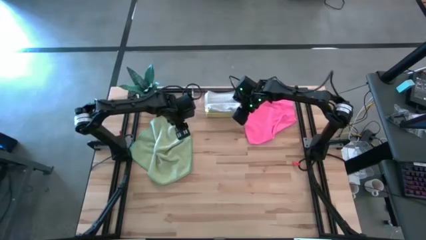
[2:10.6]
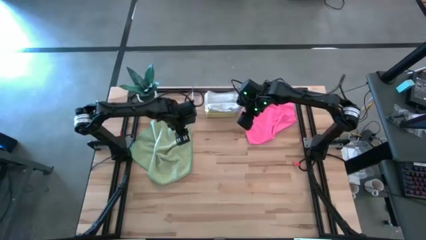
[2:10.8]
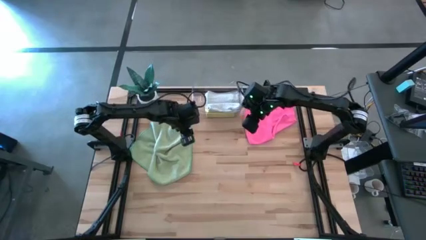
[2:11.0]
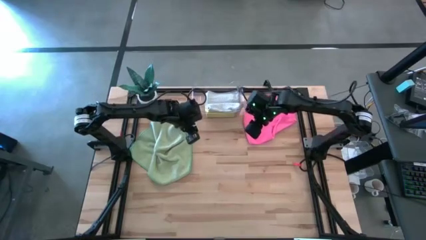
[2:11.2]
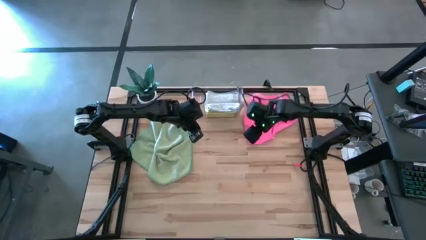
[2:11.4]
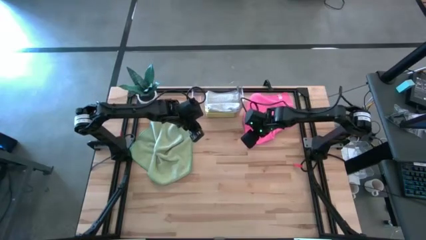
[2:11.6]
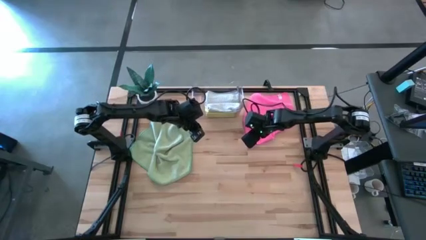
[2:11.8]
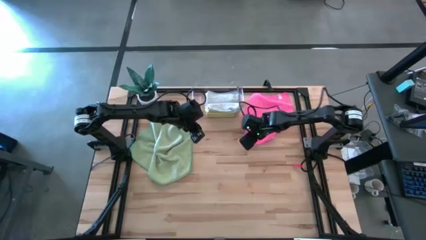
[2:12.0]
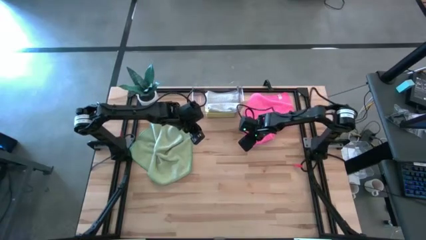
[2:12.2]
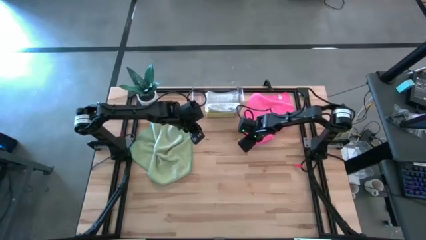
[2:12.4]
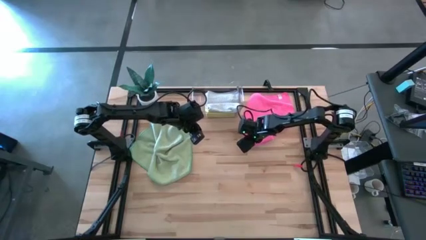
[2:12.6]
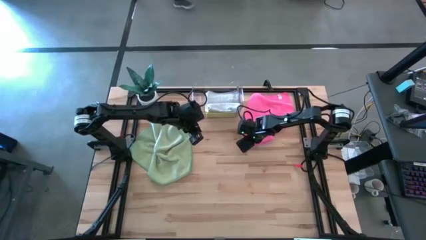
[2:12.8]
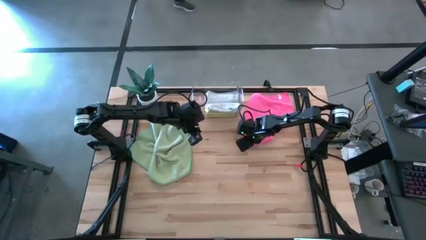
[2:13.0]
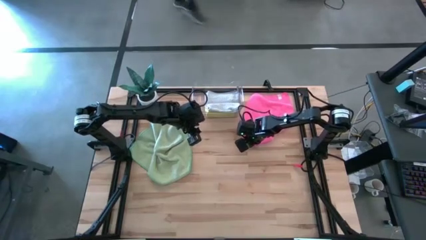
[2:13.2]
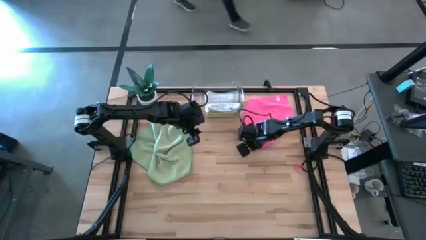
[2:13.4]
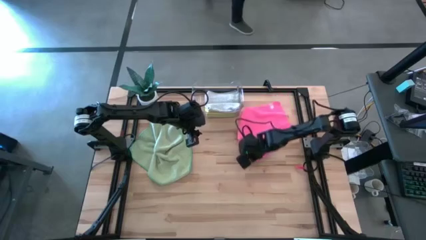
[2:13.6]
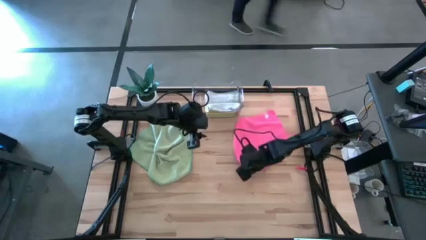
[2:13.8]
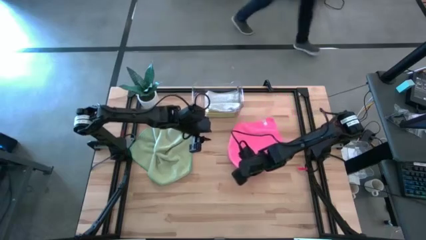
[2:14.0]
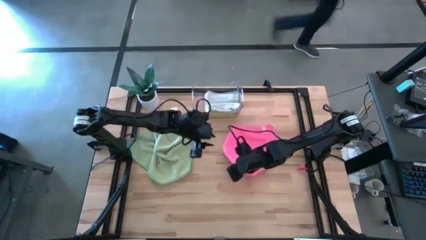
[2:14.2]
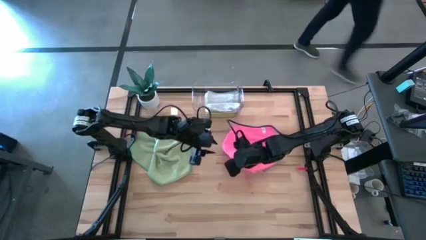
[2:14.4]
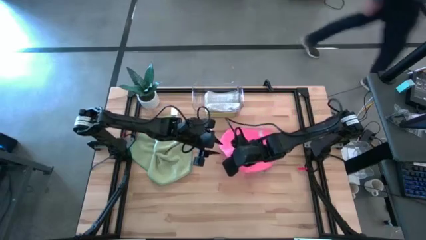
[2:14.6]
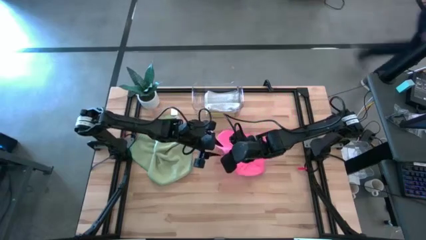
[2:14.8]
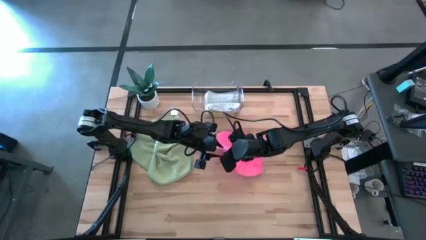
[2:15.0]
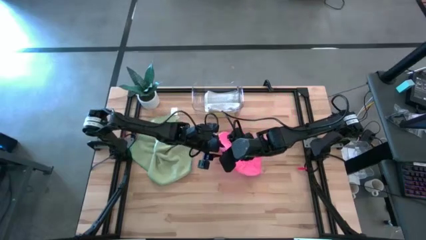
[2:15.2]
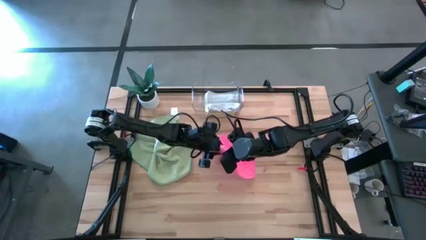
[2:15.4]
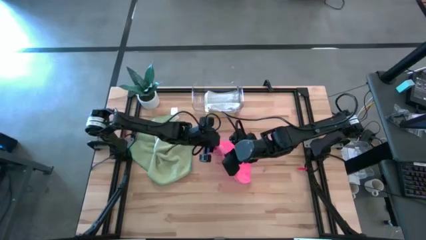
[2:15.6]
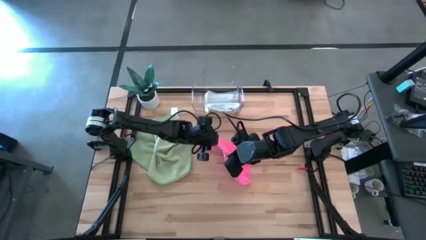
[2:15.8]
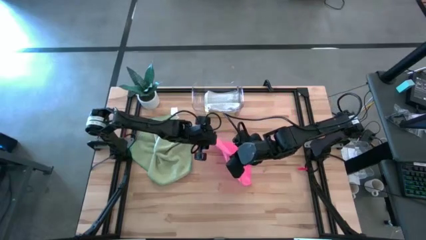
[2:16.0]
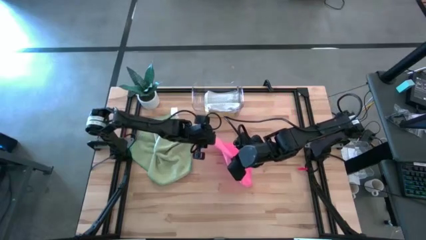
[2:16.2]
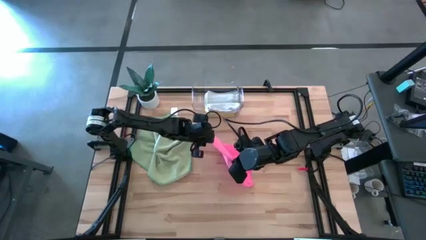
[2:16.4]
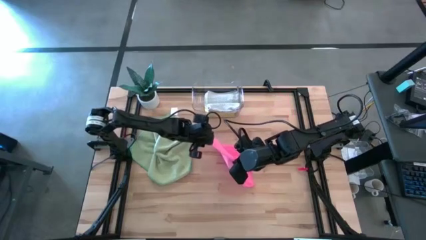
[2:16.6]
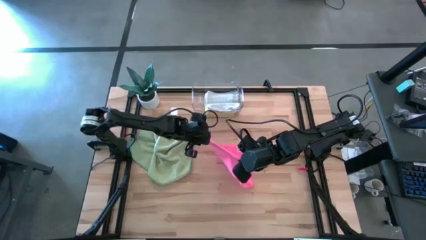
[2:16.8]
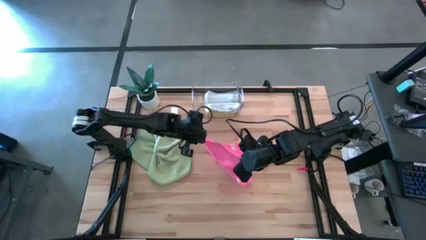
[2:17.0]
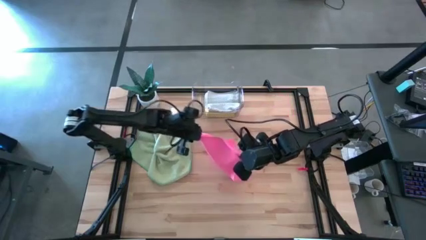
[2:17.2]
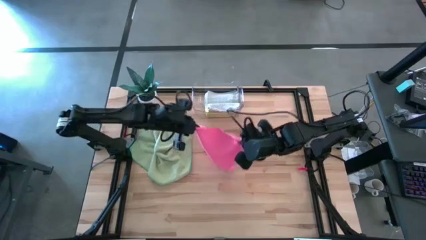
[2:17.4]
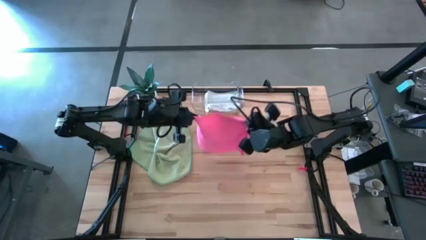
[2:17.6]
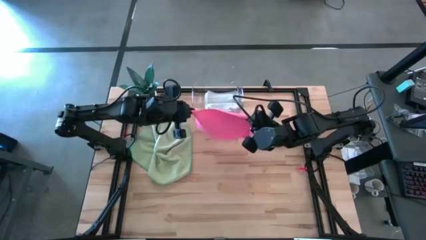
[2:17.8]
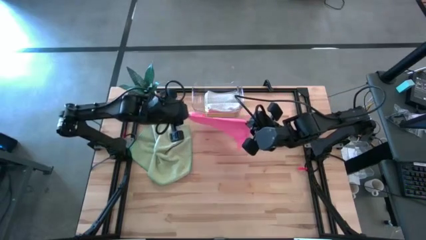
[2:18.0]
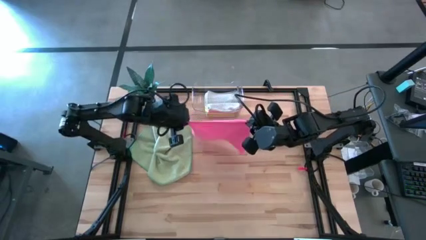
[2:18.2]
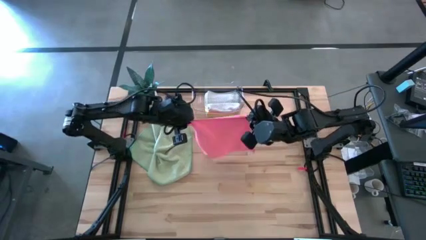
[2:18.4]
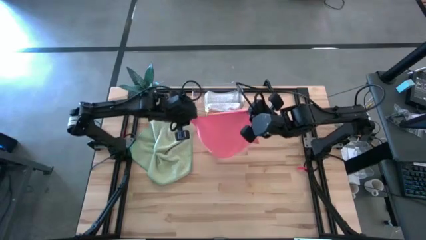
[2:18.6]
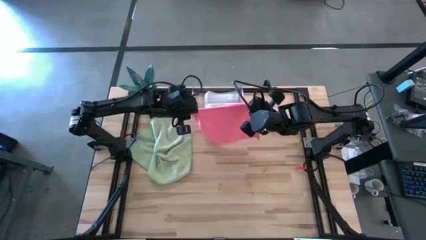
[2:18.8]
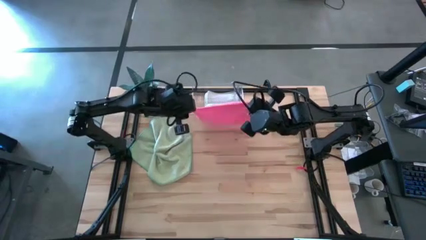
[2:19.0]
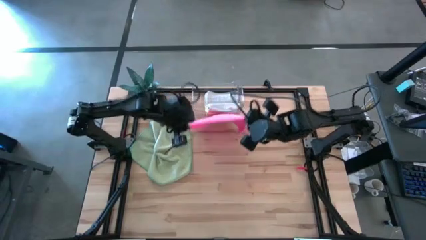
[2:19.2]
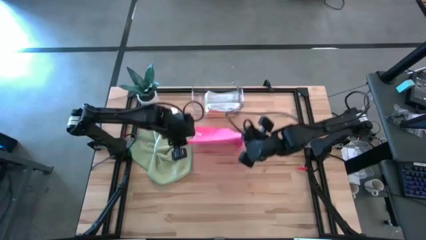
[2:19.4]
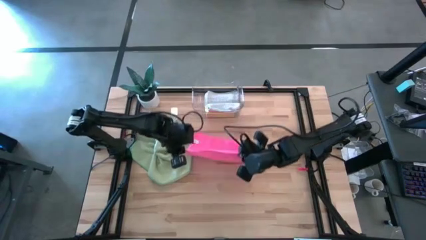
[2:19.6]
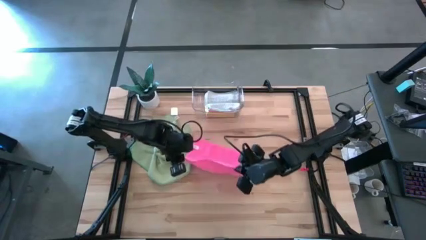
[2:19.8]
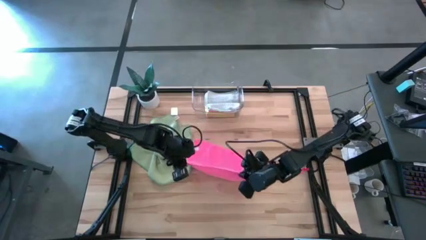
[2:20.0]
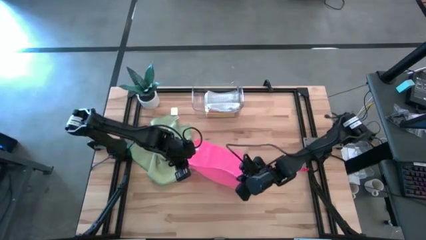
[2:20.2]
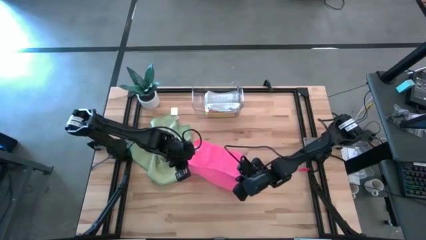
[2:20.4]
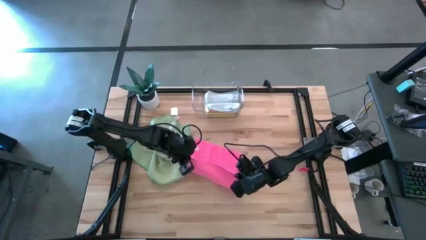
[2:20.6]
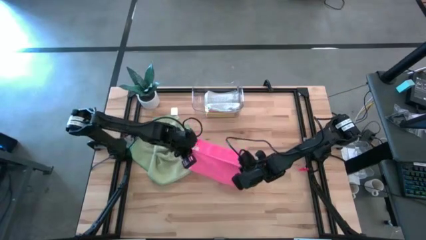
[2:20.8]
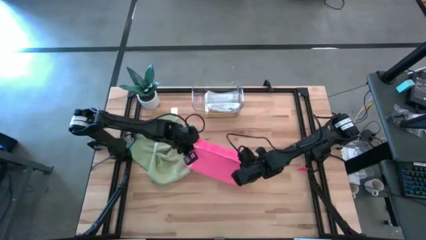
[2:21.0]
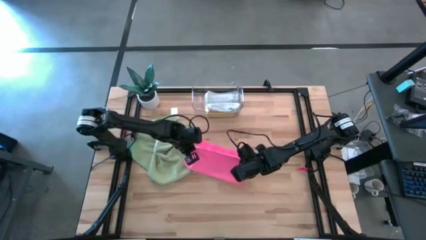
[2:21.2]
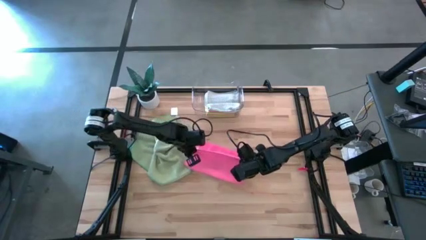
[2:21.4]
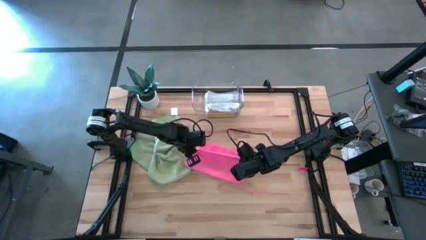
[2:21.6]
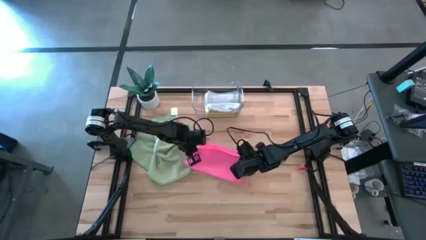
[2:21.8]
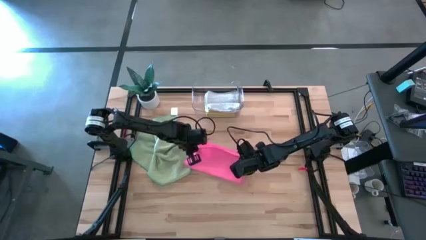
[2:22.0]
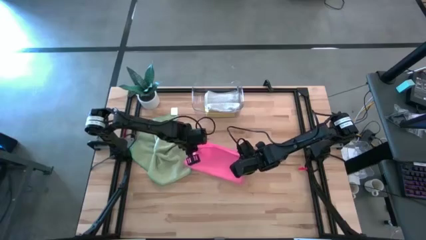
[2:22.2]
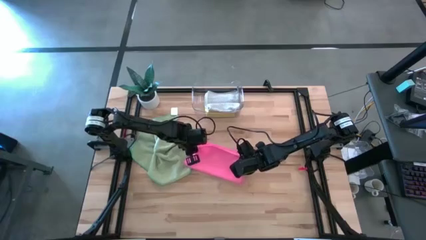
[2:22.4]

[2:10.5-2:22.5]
Task: Fold microfiber towels
Fold the pink microfiber cloth

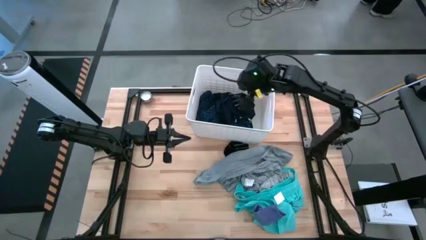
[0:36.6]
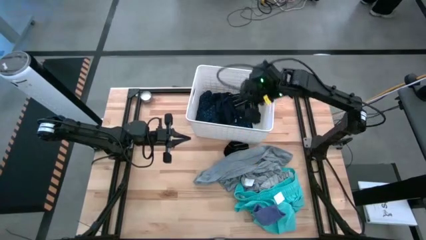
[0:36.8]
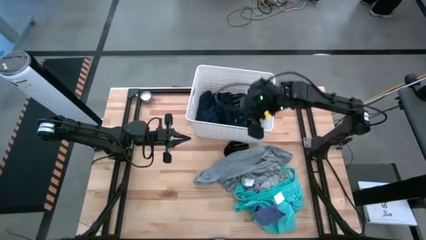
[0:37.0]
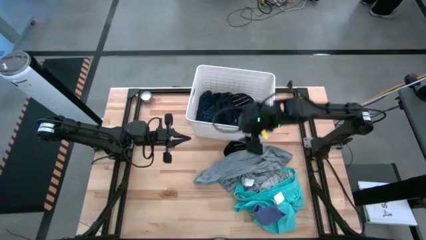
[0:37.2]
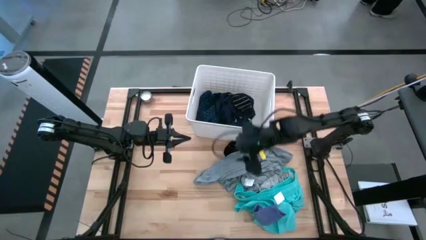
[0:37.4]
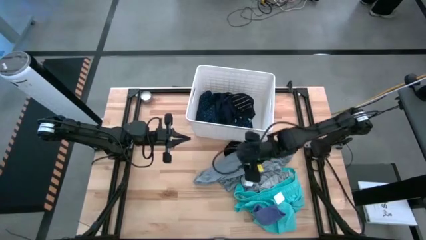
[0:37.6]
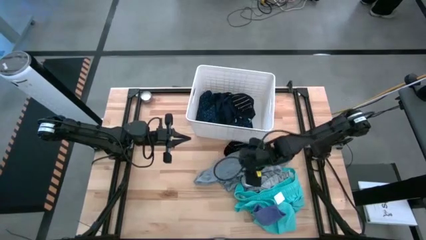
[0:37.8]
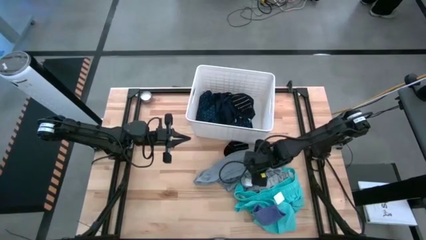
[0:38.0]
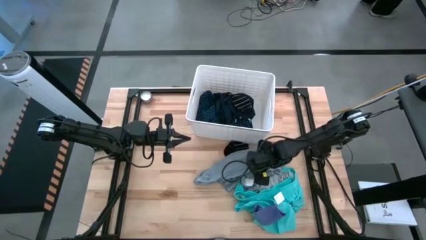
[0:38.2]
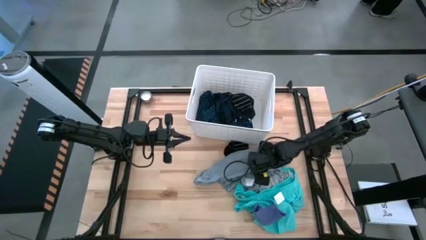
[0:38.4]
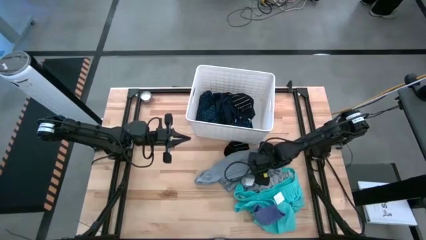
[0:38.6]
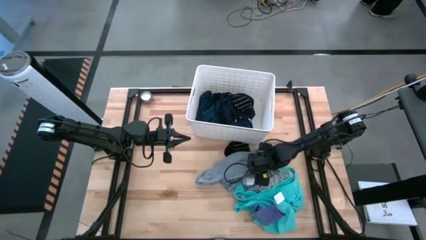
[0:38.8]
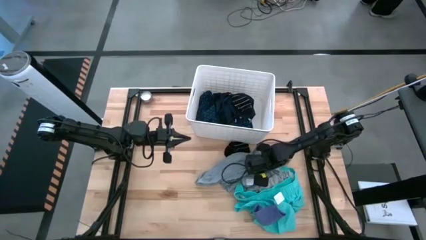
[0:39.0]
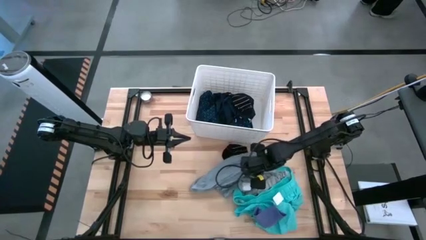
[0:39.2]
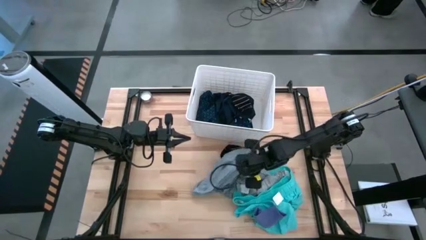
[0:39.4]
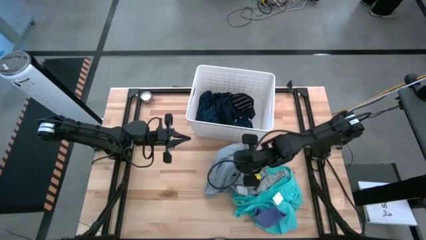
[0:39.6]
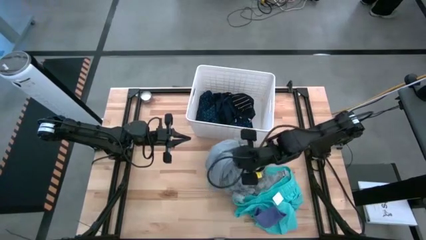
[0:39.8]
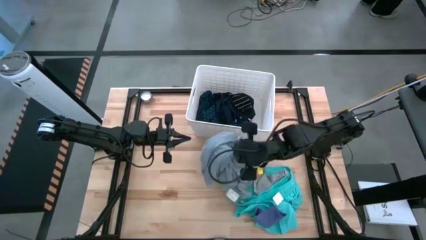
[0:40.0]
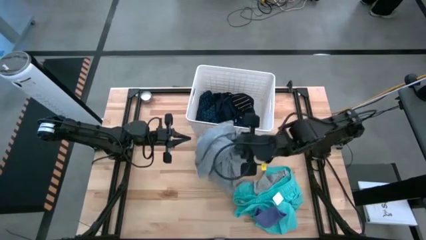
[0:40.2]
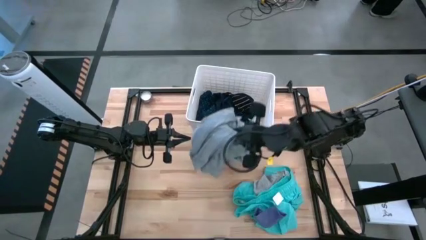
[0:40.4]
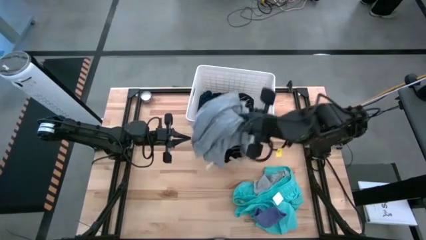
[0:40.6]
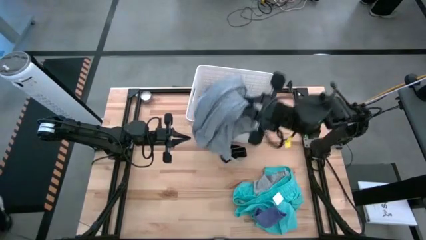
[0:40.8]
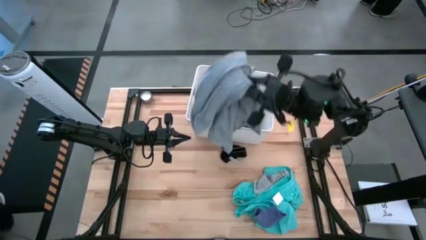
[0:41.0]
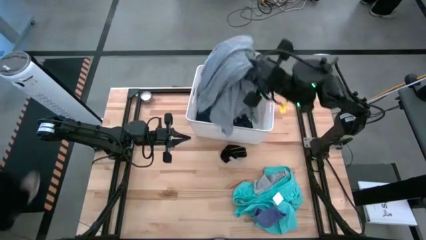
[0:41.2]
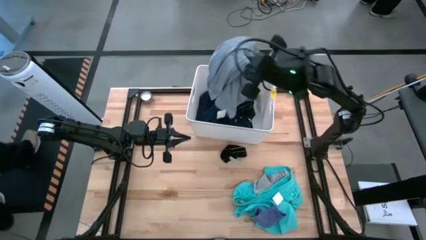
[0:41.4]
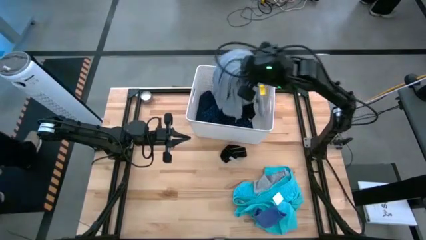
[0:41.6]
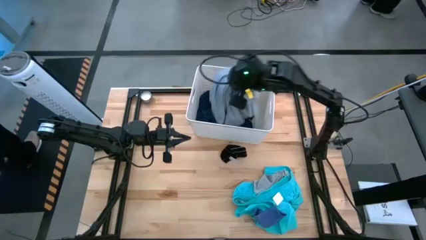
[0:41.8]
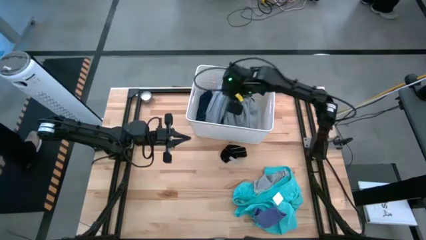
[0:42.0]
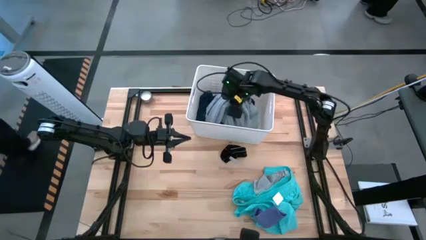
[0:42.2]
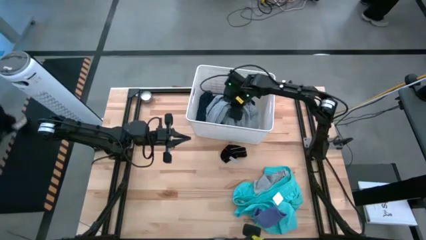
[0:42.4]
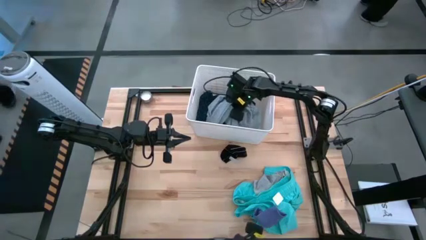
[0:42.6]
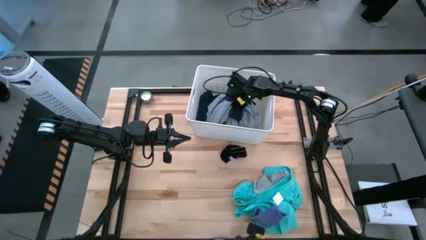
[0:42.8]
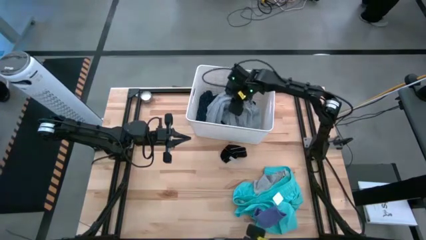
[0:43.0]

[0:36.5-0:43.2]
Task: Sort clothes
Put the gray shirt into the laundry bin
